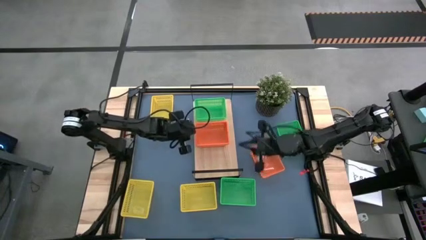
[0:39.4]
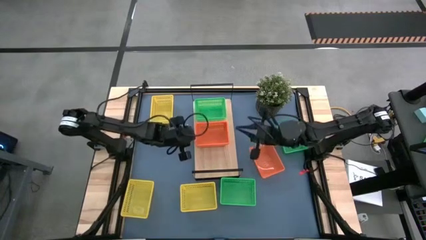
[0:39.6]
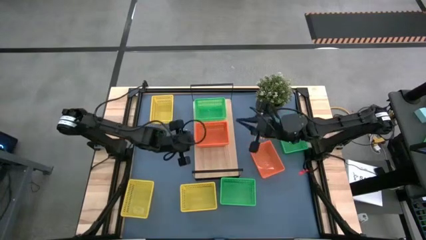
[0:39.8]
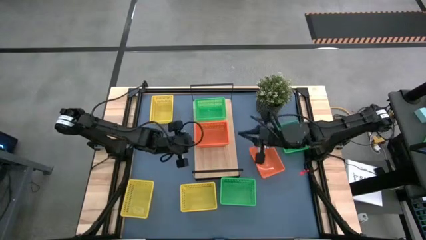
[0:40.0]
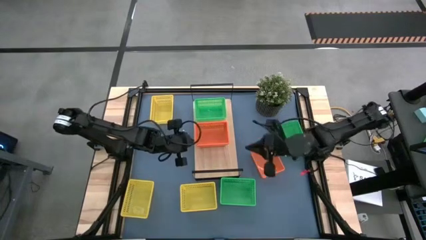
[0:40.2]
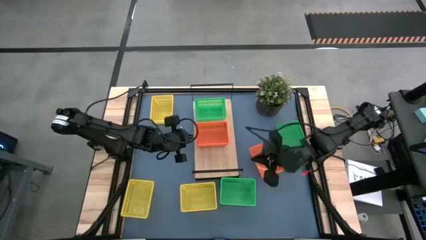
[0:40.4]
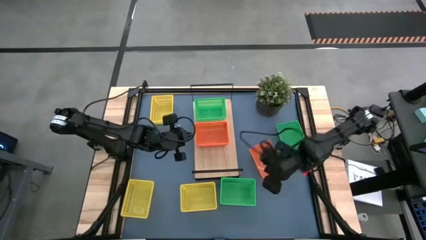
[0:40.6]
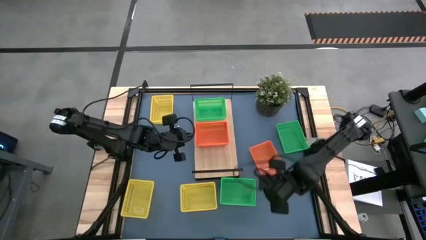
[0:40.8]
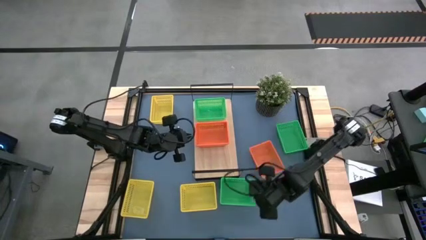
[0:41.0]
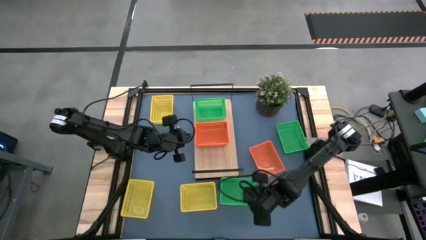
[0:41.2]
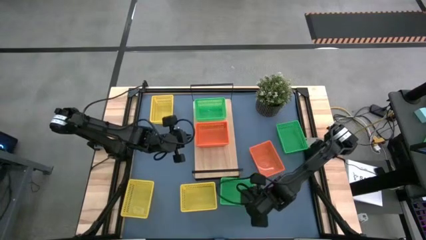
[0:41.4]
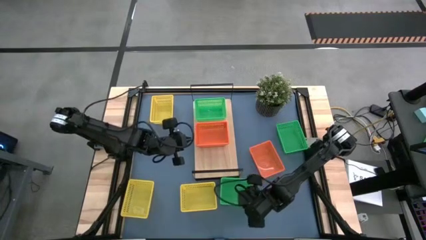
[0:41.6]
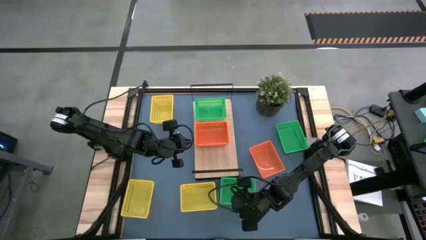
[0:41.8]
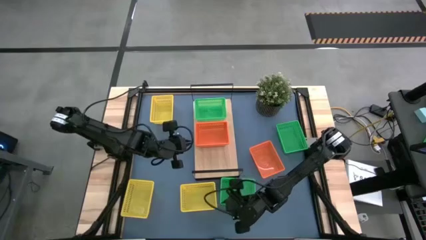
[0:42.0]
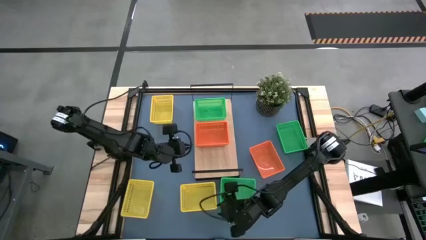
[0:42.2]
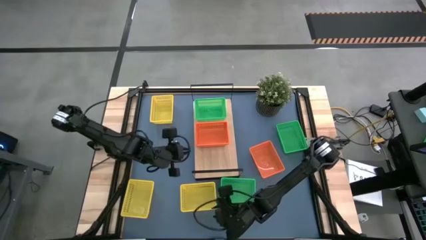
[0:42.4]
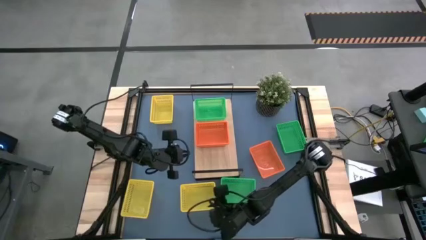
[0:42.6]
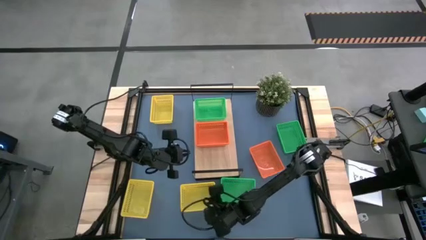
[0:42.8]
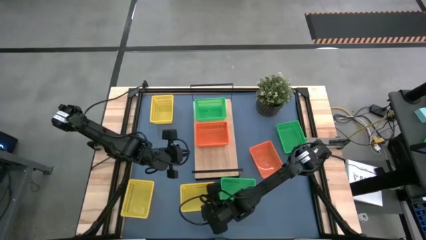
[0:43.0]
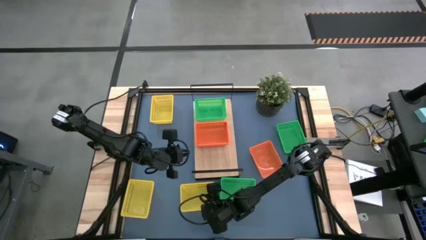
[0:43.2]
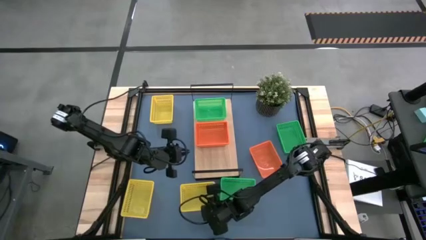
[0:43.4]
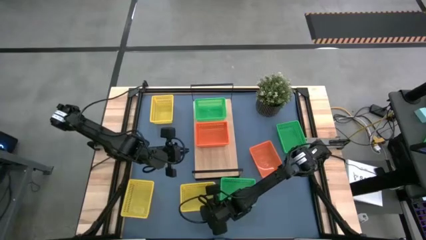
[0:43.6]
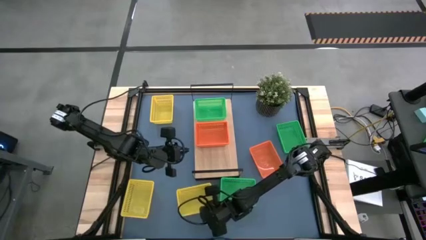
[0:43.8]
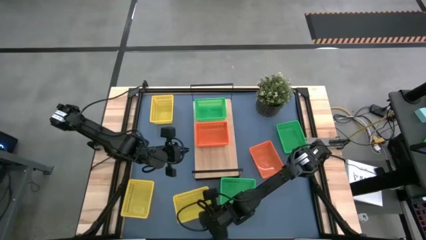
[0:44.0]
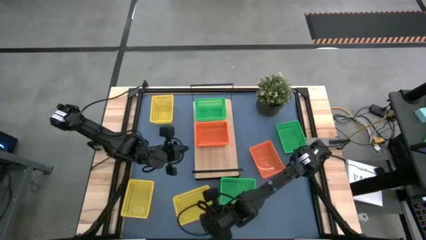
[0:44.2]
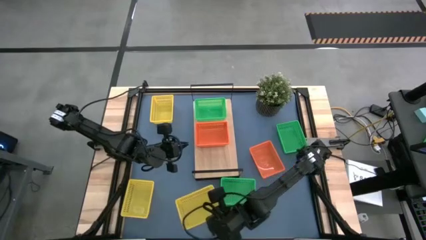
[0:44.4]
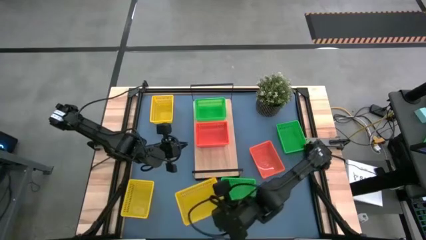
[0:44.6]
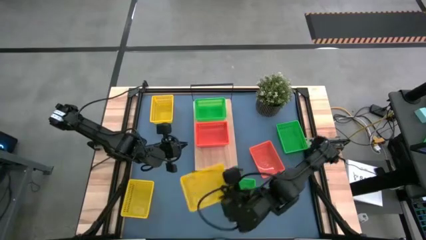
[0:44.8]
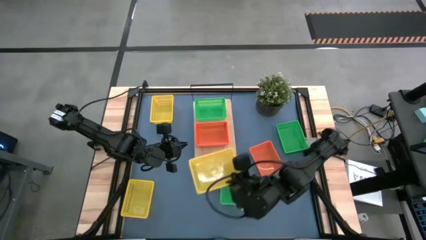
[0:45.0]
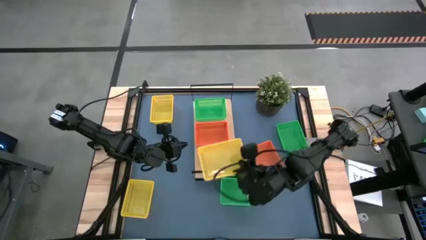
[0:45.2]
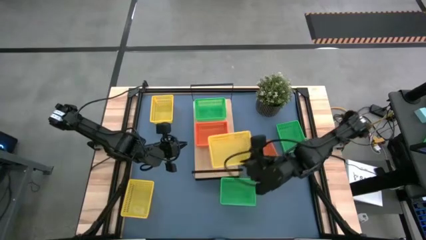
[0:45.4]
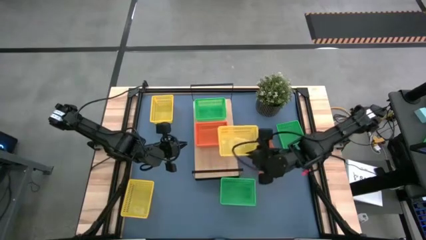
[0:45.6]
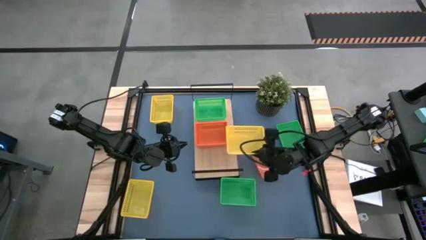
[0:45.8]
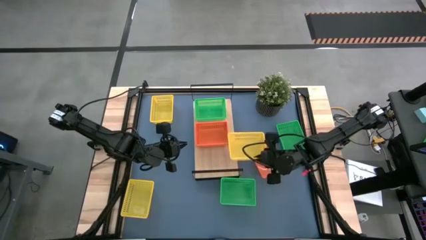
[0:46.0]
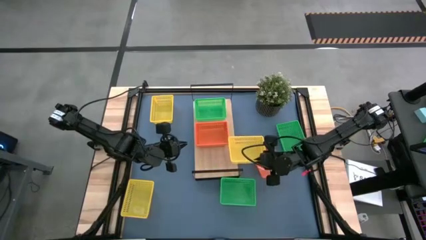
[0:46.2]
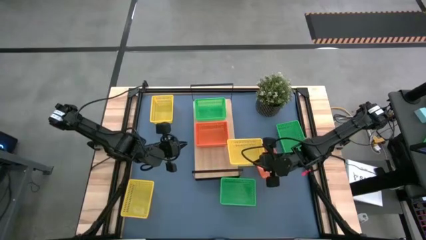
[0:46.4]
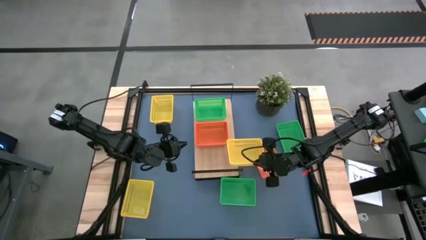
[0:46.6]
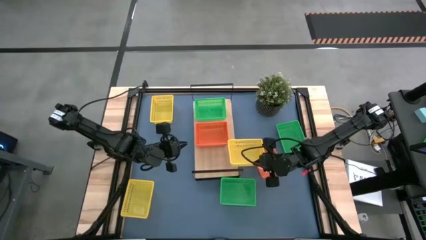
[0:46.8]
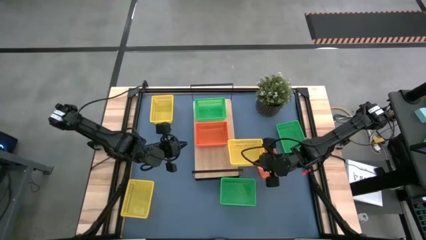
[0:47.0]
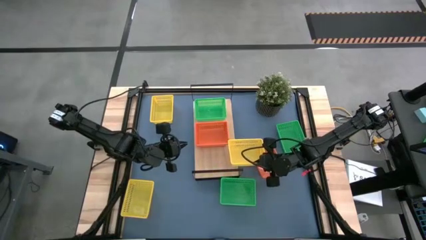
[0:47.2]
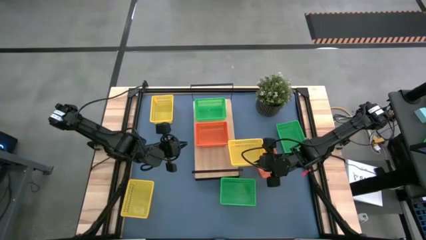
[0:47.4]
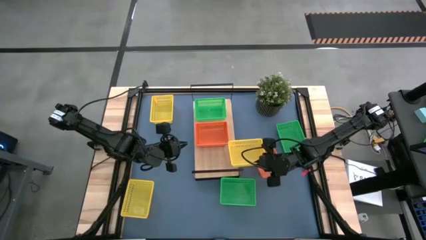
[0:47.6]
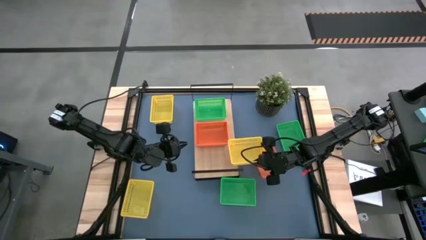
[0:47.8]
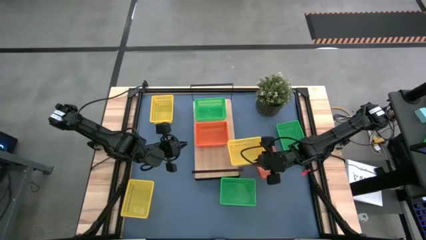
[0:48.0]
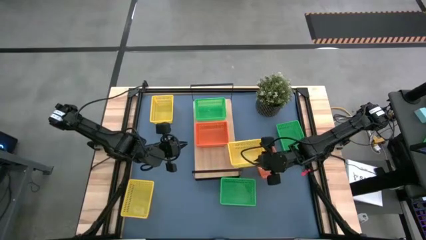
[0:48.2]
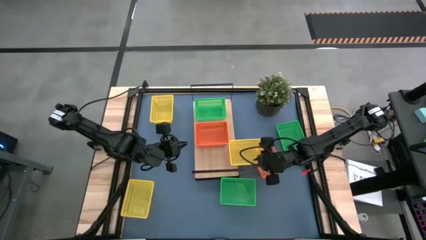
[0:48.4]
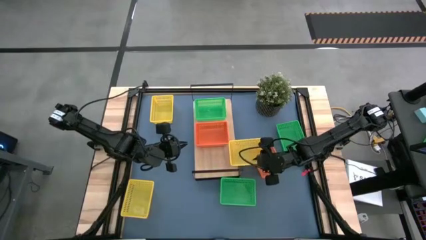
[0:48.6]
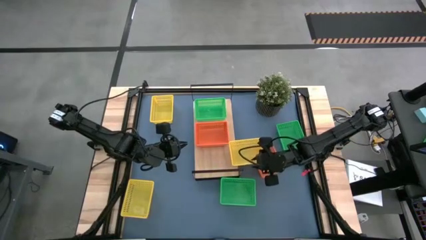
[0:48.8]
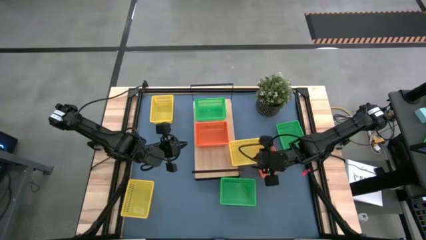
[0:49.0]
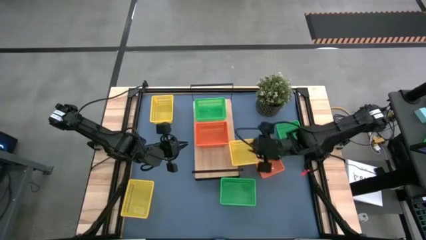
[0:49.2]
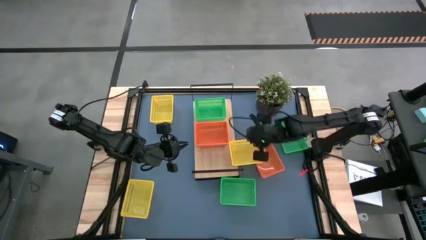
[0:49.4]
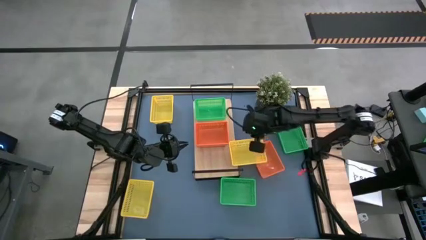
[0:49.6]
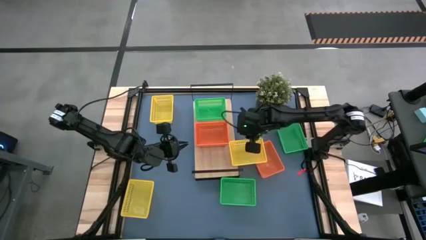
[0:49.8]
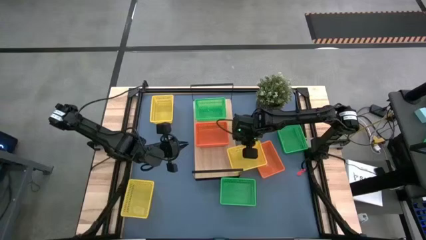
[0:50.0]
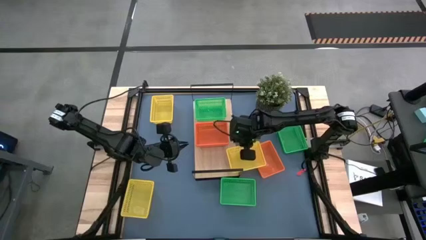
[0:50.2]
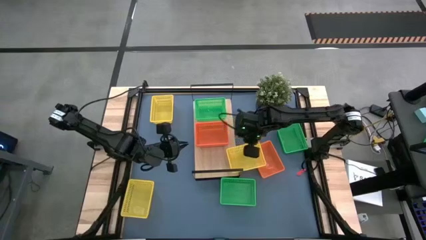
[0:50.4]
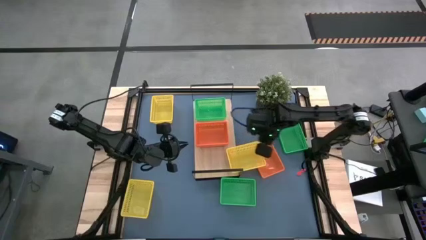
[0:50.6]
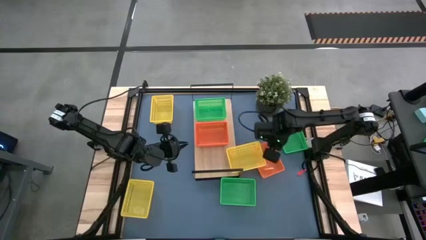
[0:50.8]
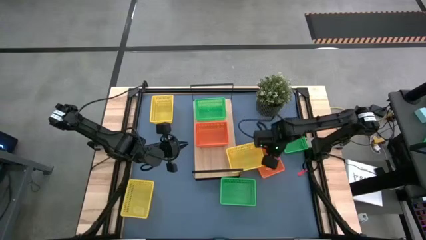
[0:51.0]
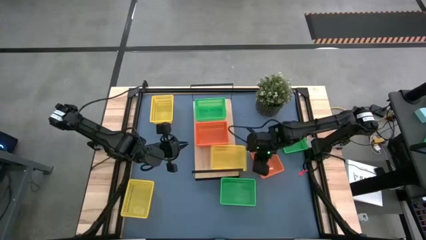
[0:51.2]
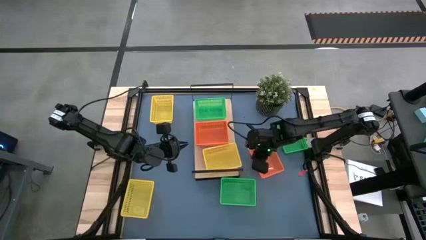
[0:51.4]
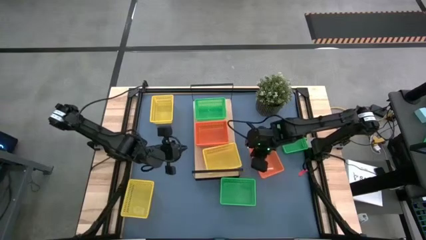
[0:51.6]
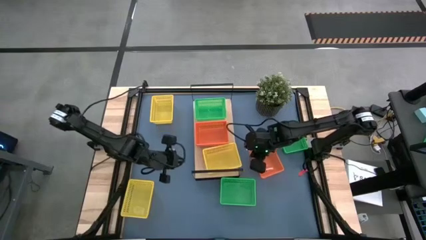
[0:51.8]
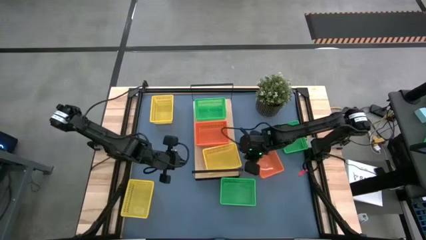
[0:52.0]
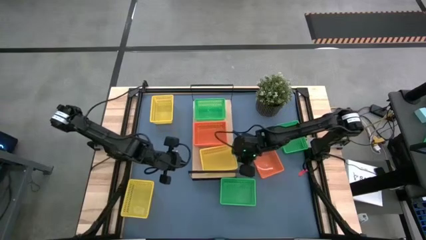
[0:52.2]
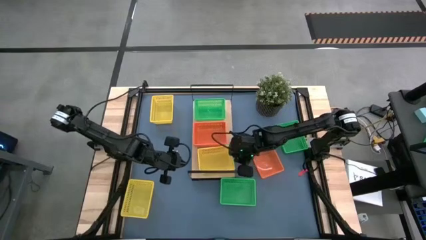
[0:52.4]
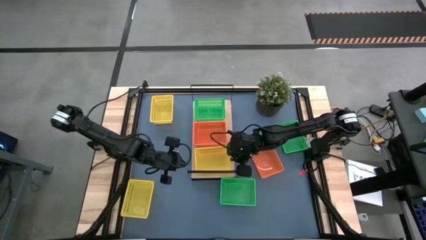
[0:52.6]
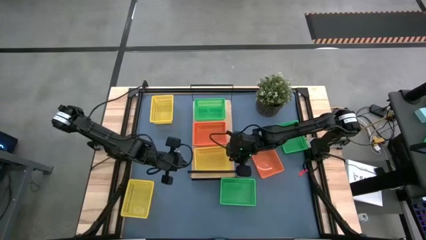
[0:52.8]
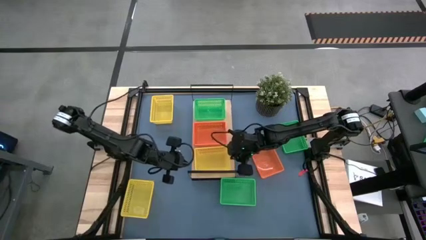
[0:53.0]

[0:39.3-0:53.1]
Task: Stack baskets on shelf by color
Put the right yellow bin on the shelf
